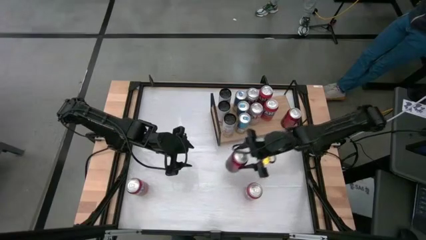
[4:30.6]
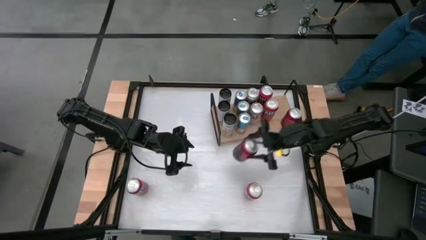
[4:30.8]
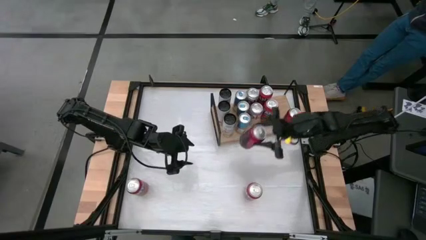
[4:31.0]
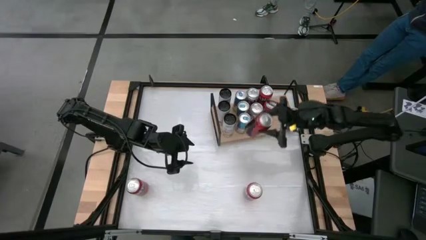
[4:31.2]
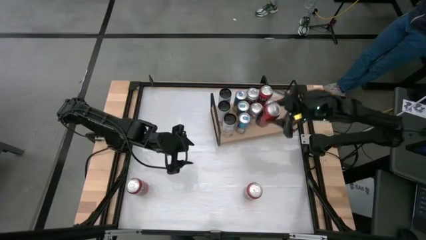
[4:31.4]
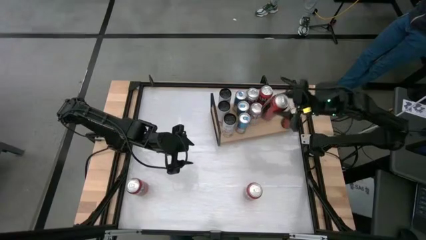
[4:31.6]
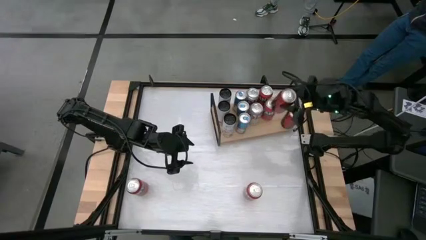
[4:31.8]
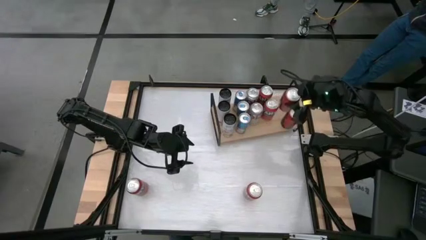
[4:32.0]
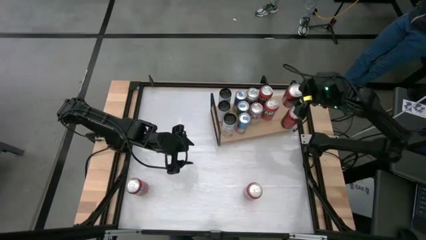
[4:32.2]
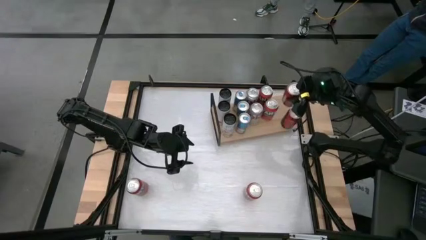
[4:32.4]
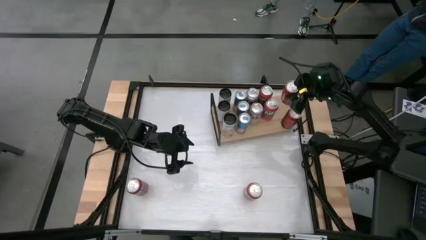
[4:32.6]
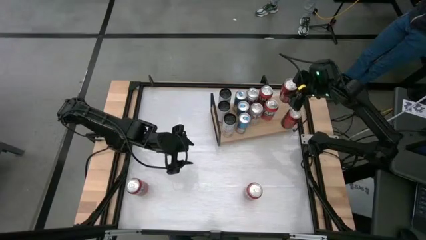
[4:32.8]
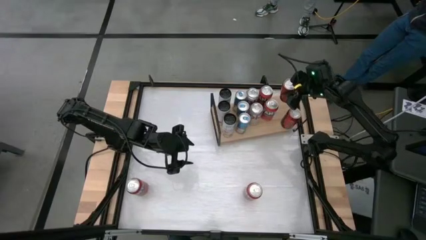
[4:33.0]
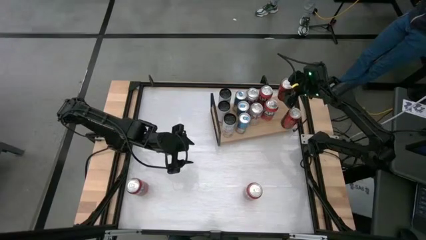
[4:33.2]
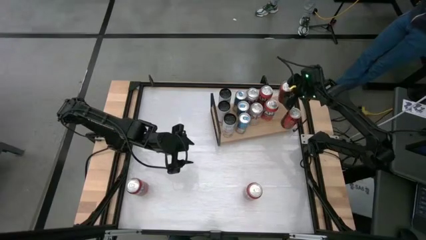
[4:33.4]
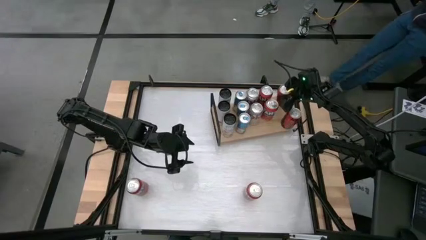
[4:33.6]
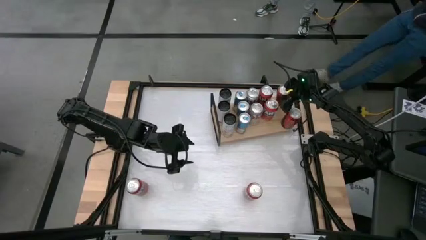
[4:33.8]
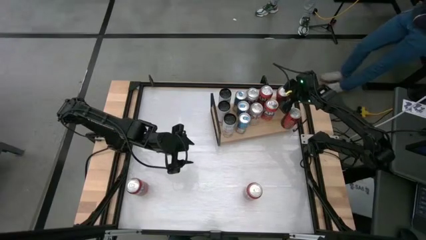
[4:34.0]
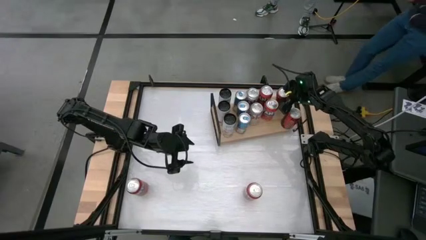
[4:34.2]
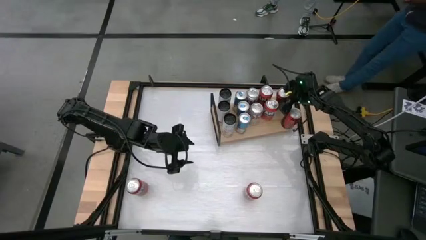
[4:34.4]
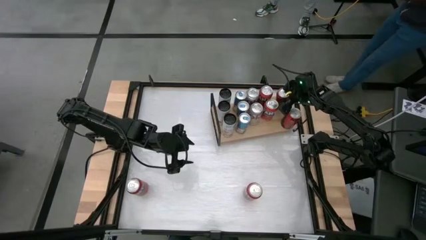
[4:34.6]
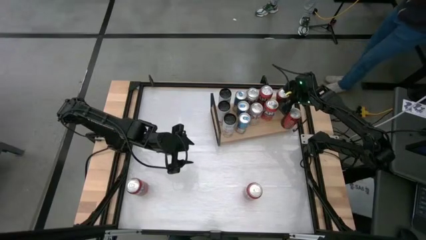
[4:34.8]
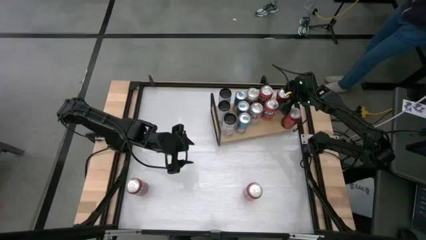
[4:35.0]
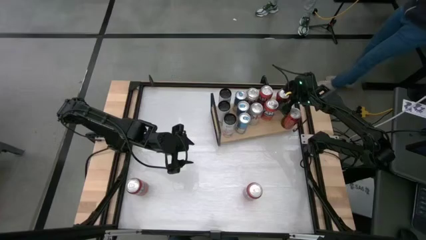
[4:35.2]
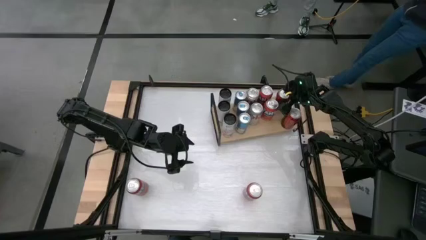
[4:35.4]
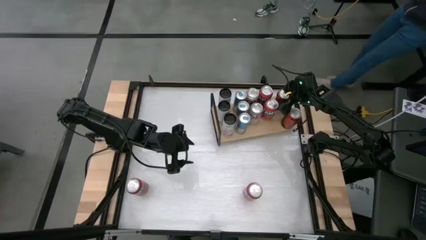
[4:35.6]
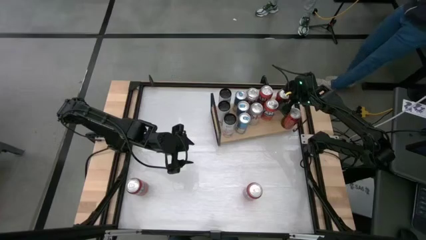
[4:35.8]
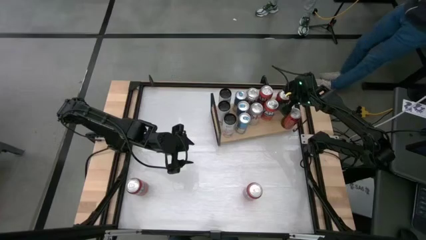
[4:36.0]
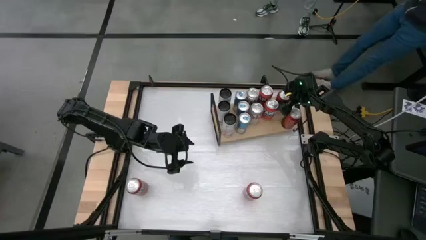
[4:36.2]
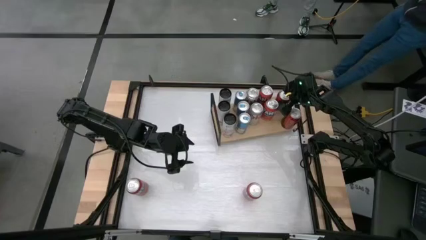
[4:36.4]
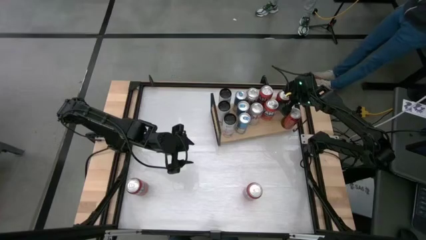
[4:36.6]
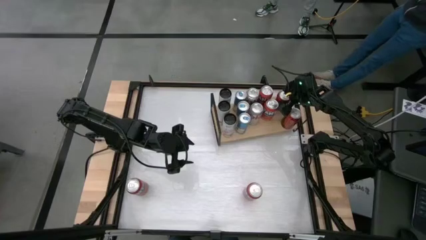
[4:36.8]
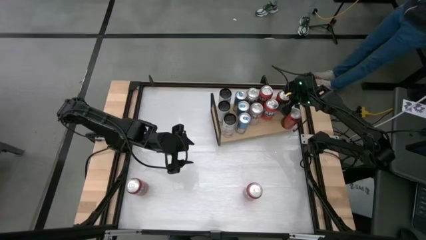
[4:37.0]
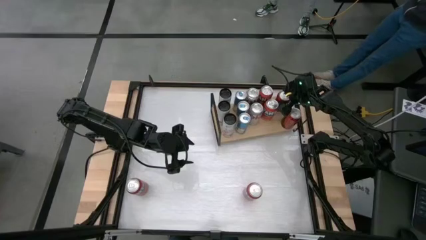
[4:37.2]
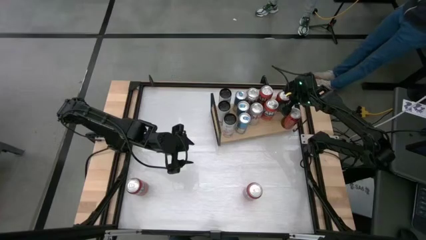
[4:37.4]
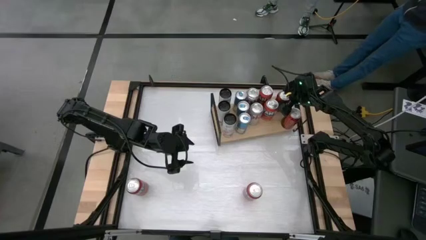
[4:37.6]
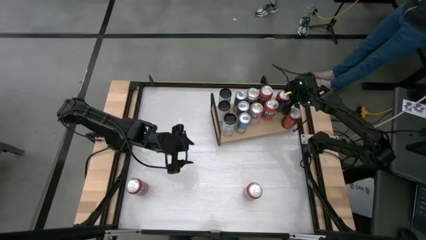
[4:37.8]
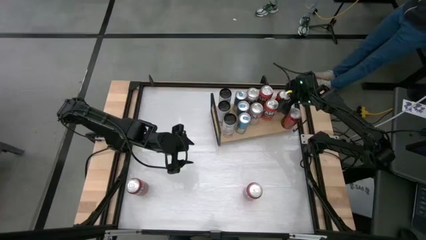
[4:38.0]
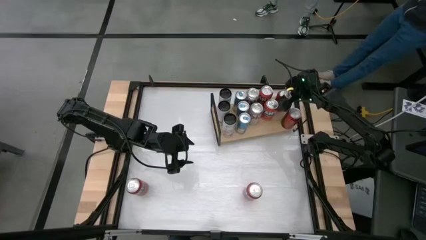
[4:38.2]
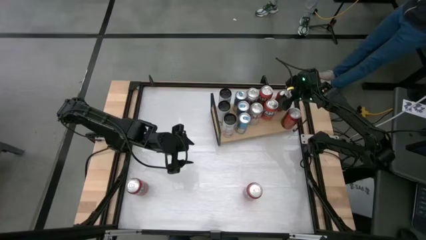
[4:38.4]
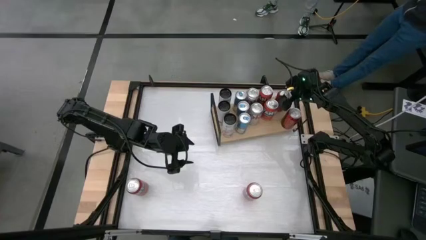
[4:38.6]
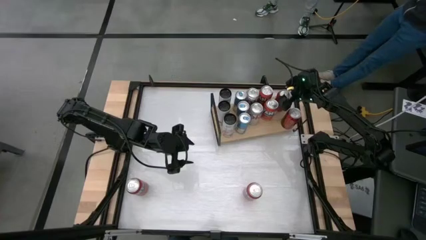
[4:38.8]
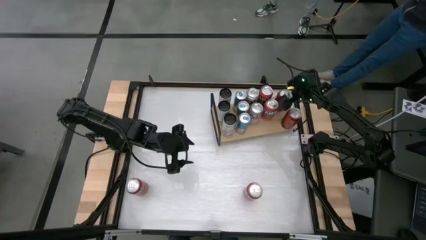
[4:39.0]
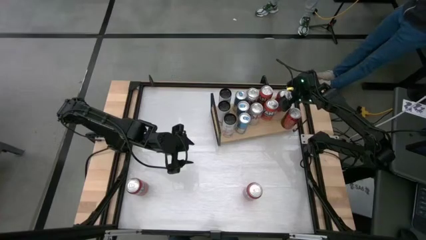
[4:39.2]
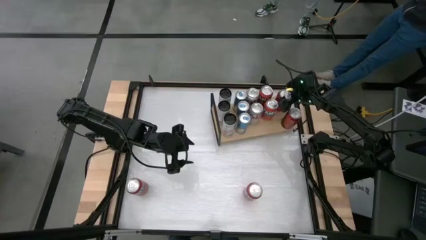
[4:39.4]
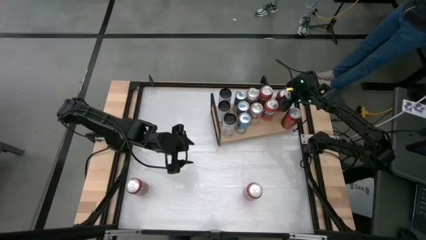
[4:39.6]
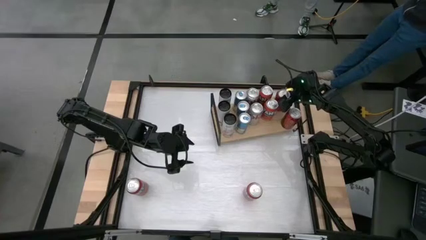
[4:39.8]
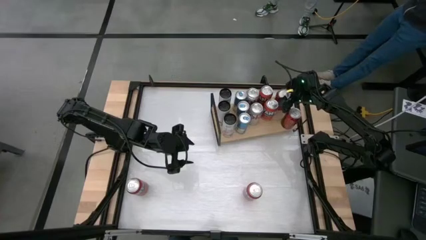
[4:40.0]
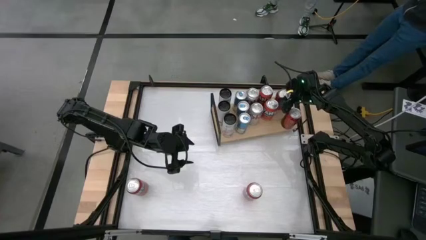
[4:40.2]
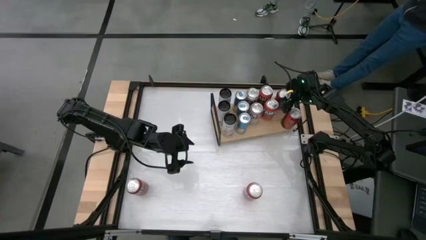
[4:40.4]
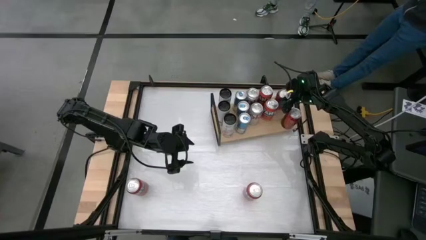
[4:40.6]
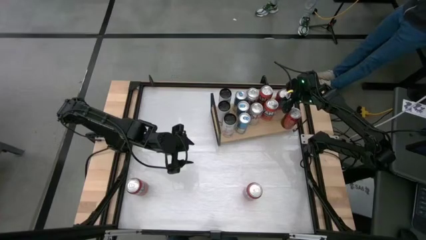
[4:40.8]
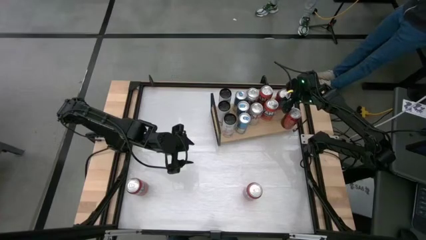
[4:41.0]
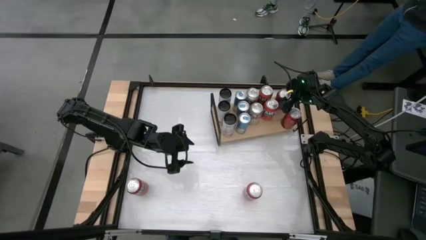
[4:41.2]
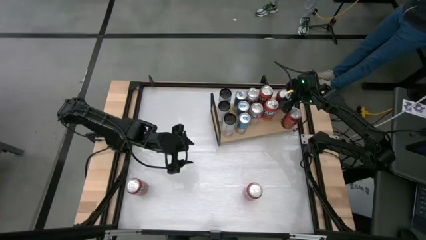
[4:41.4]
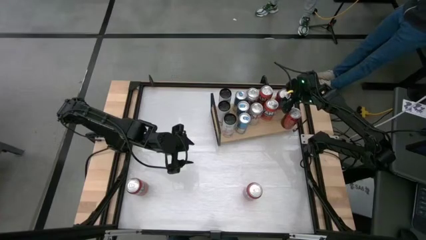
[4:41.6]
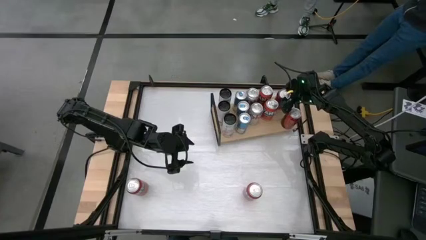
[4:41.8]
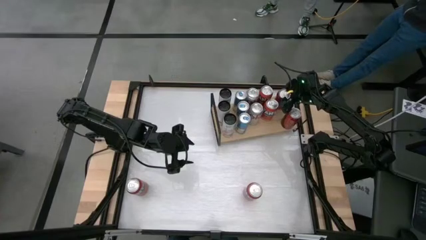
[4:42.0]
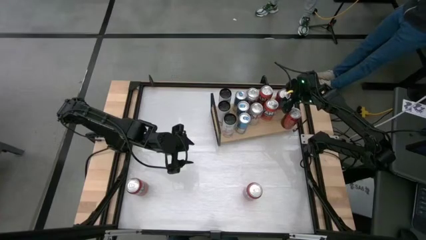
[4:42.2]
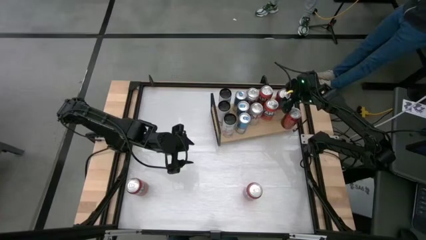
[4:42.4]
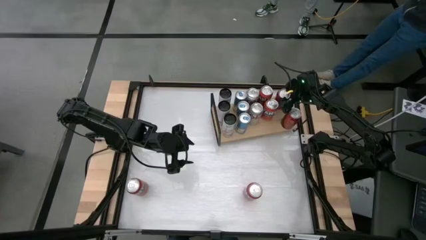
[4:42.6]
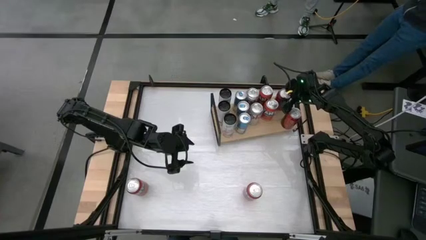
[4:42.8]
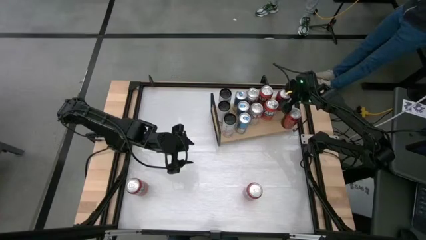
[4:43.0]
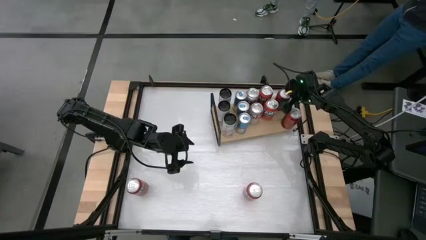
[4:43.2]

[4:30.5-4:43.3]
Task: Place canned beverage on shelf
Put the red soda can on the shelf aligned with the other red soda can

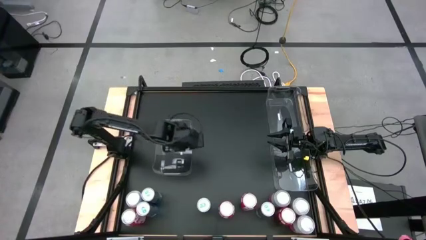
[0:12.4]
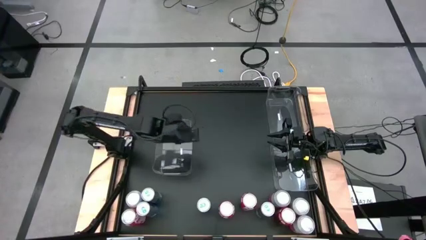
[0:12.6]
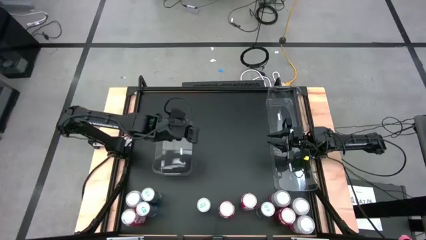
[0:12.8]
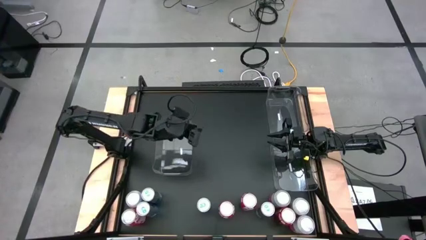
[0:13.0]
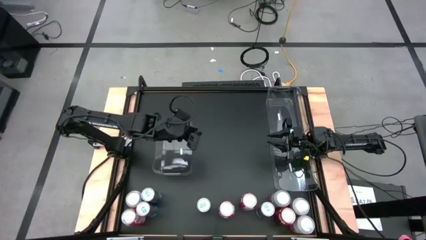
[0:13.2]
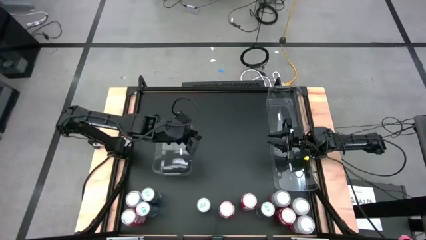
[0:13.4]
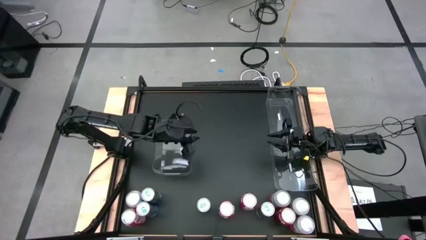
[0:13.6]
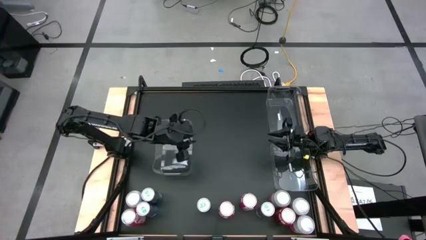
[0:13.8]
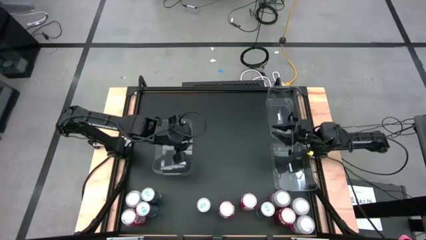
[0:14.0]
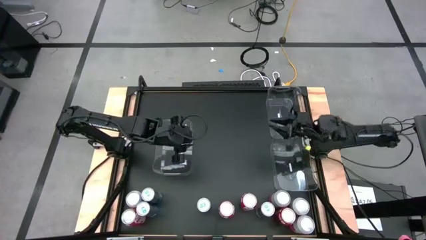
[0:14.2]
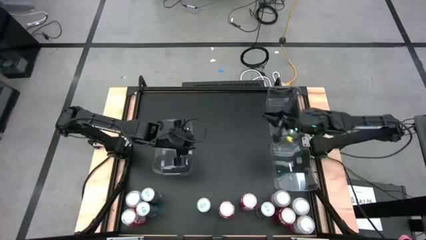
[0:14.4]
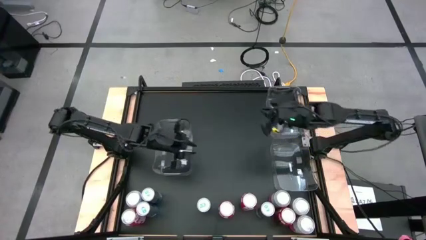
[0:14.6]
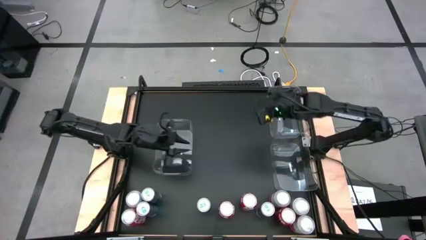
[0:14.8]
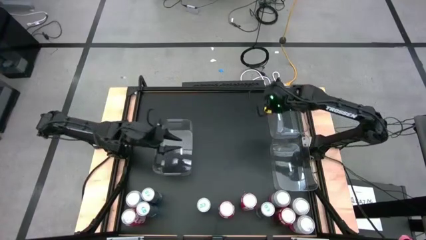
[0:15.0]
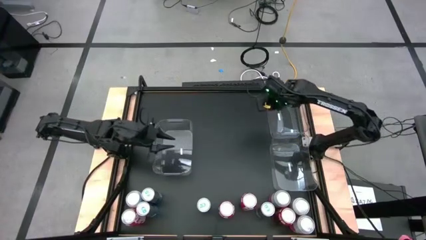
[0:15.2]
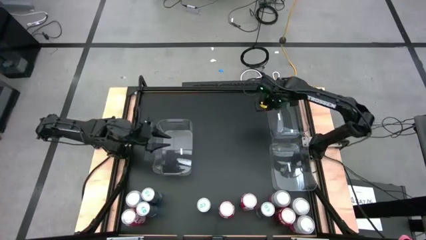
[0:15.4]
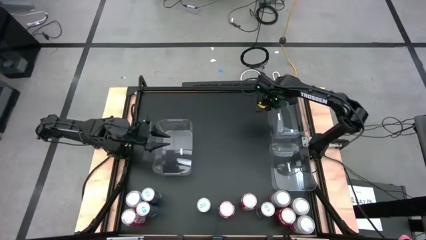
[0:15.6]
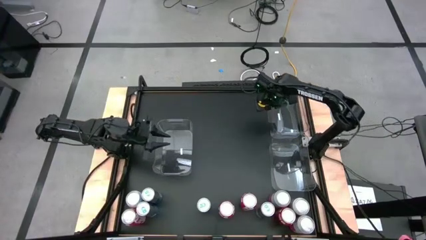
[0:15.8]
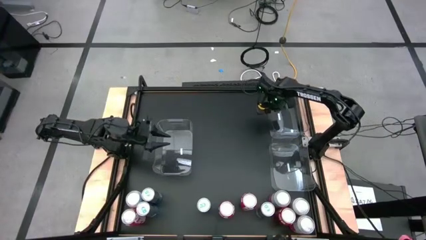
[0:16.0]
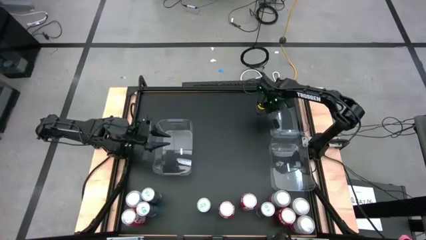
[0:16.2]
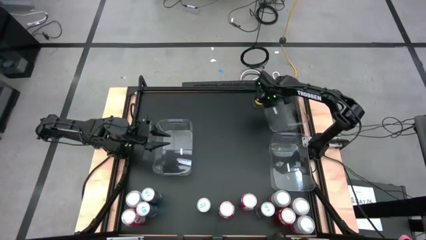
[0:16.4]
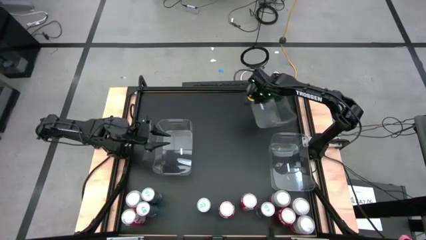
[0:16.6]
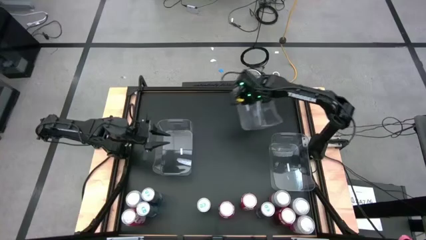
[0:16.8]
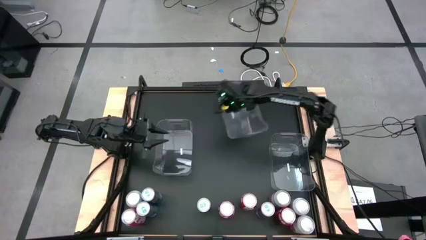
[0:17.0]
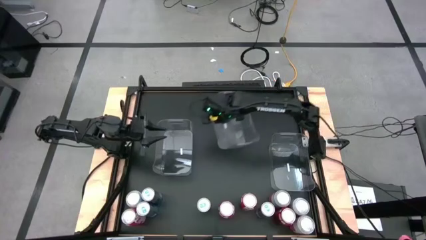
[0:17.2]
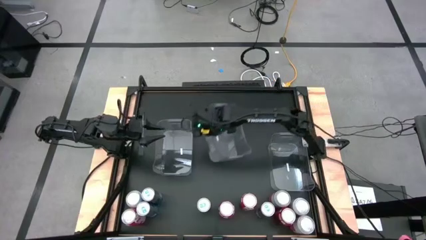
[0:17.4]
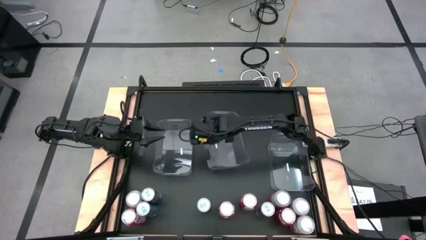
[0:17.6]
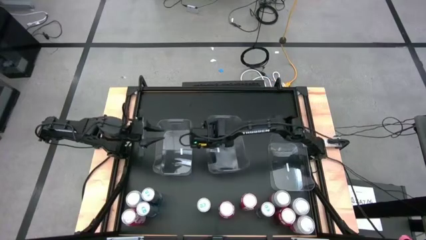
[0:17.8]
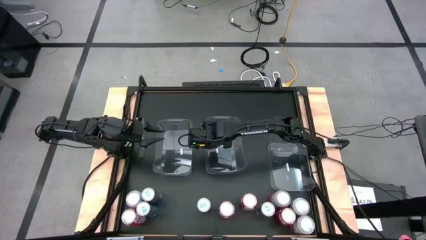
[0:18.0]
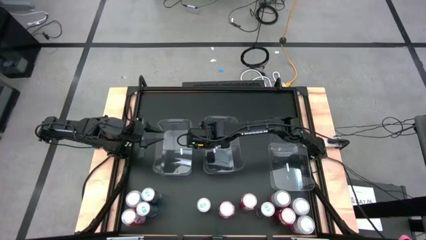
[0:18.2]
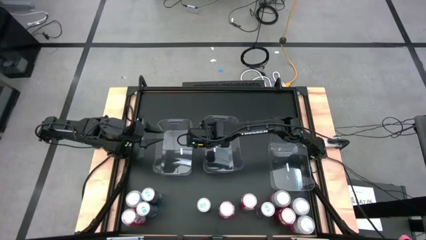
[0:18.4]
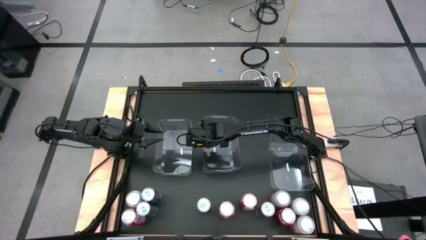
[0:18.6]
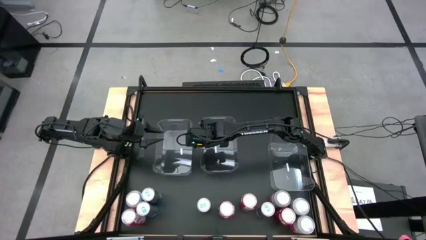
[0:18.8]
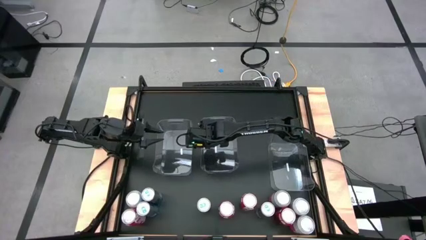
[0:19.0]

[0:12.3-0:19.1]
Task: Sort soda cans
Move the top right transparent bin to the middle of the table
